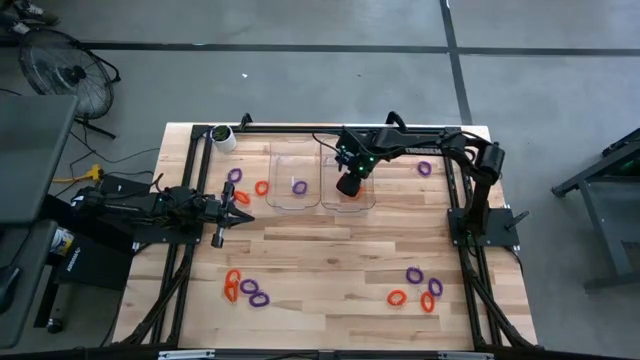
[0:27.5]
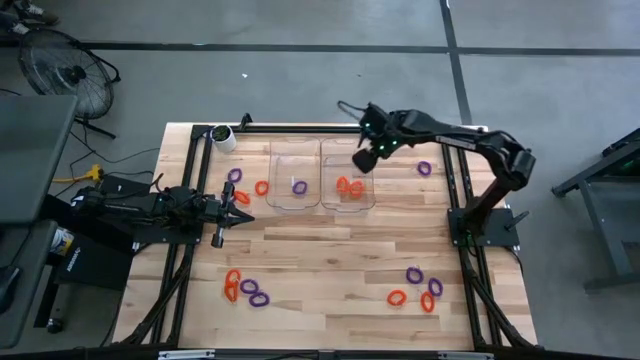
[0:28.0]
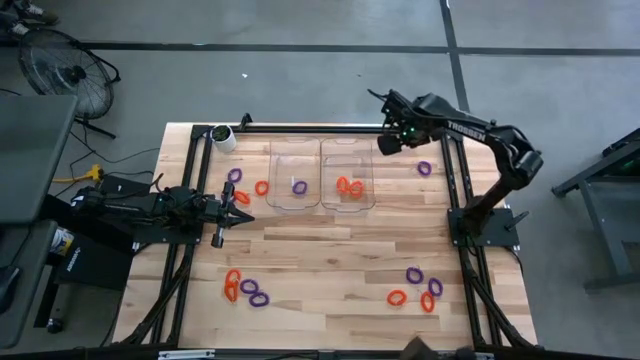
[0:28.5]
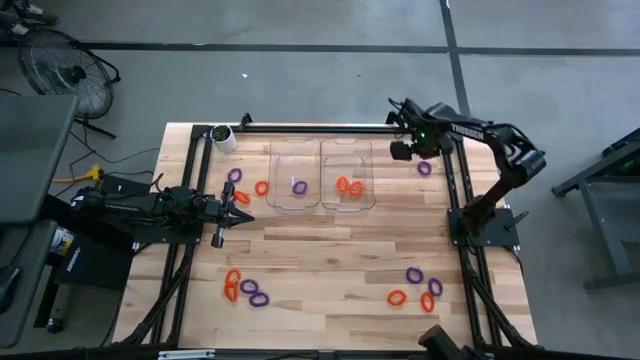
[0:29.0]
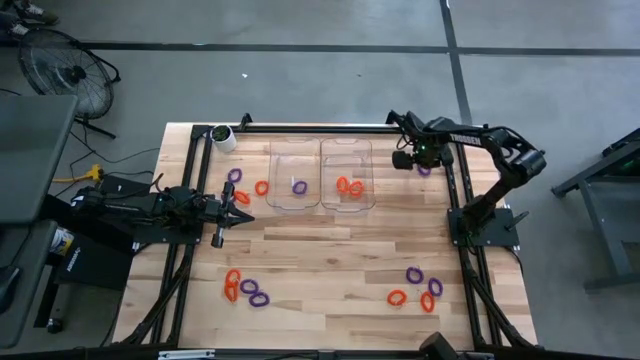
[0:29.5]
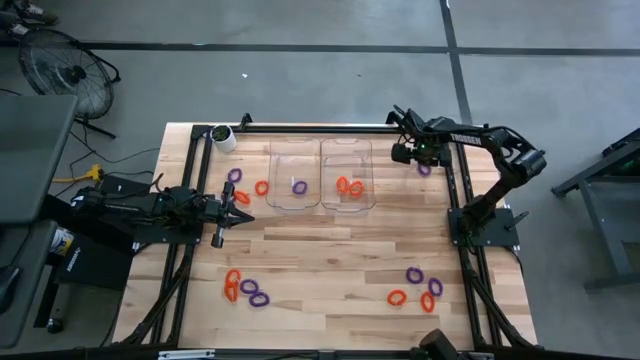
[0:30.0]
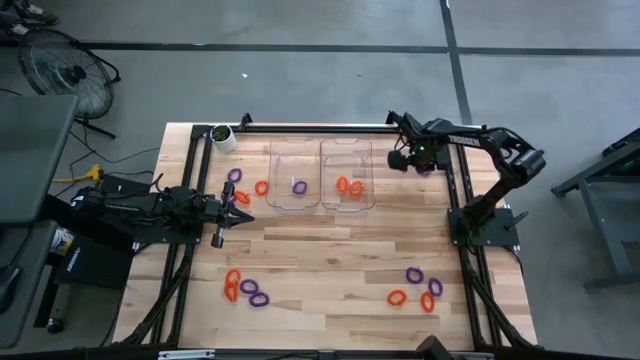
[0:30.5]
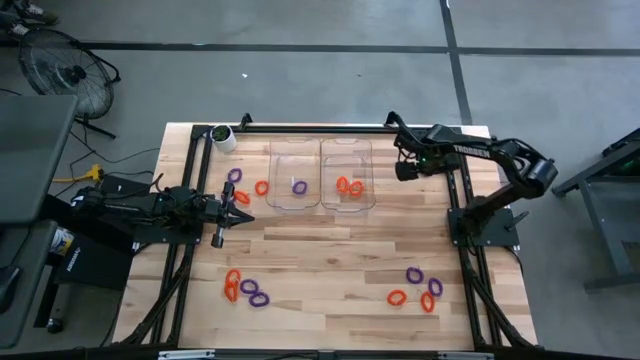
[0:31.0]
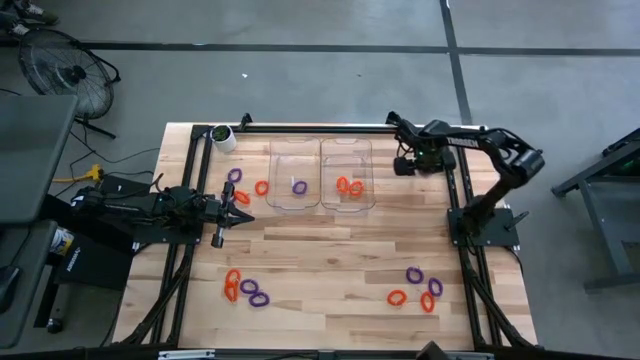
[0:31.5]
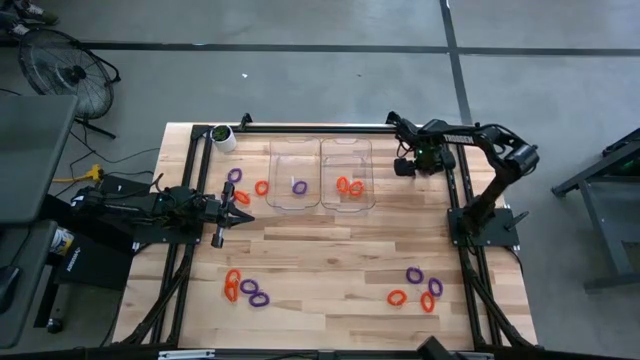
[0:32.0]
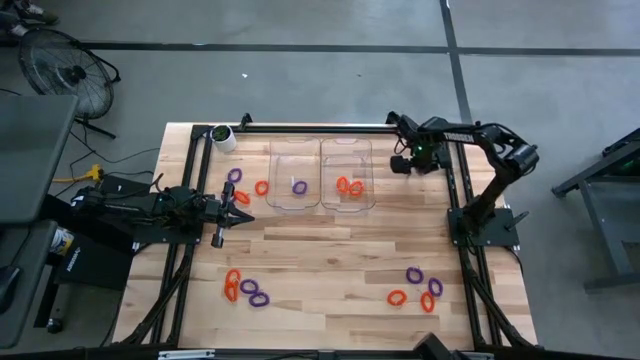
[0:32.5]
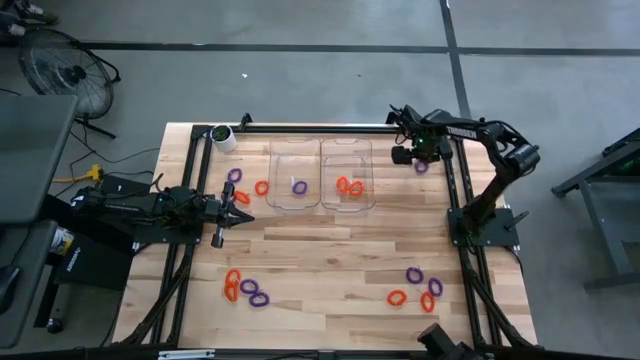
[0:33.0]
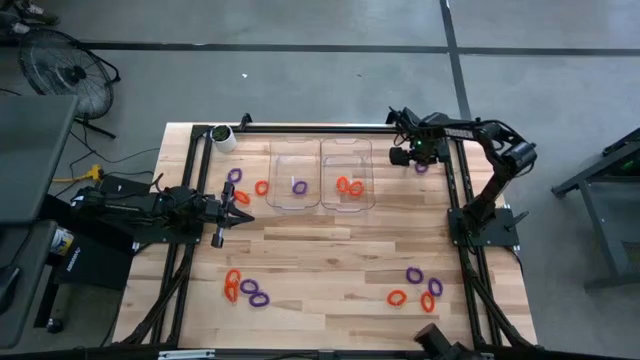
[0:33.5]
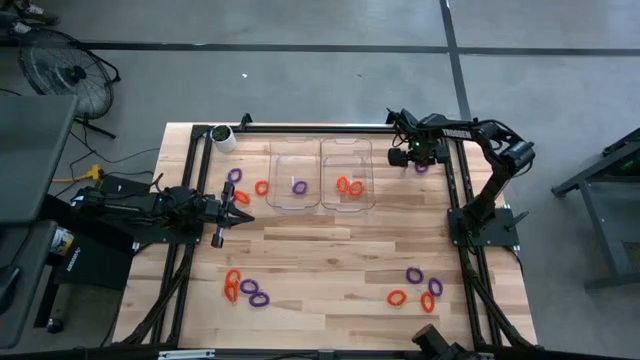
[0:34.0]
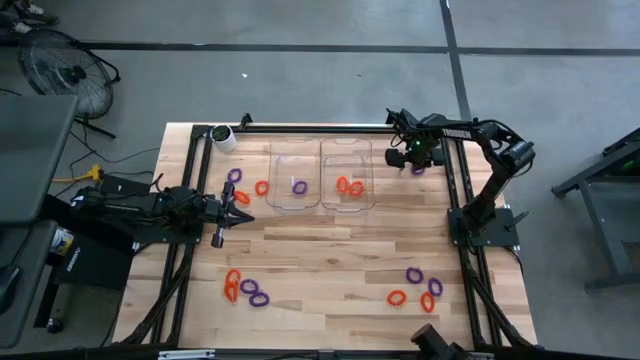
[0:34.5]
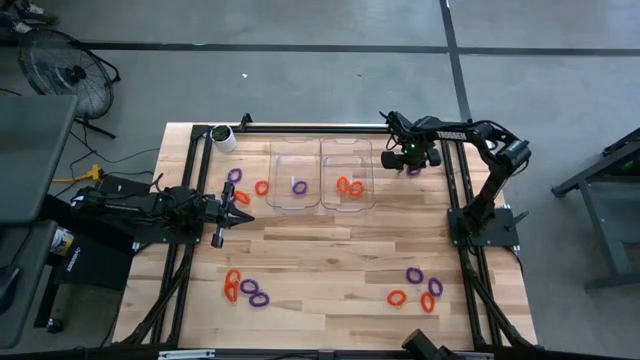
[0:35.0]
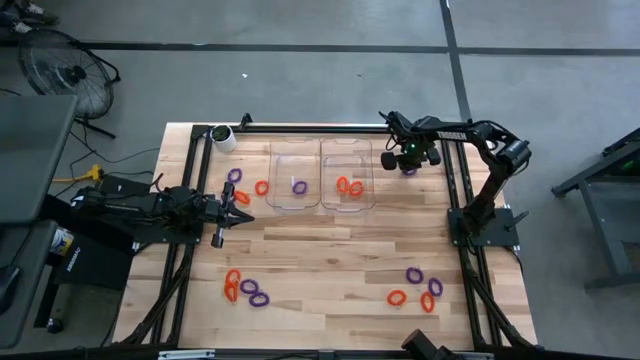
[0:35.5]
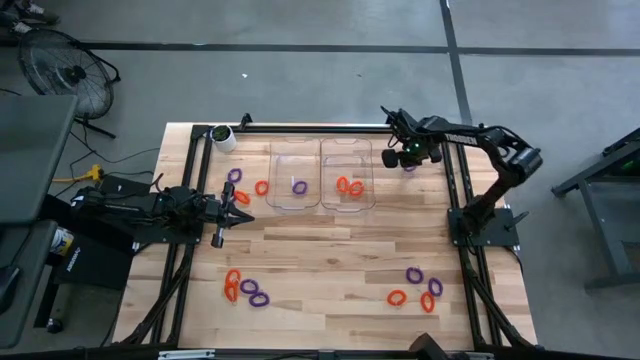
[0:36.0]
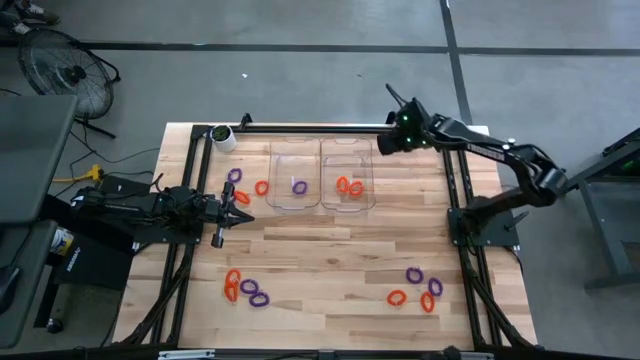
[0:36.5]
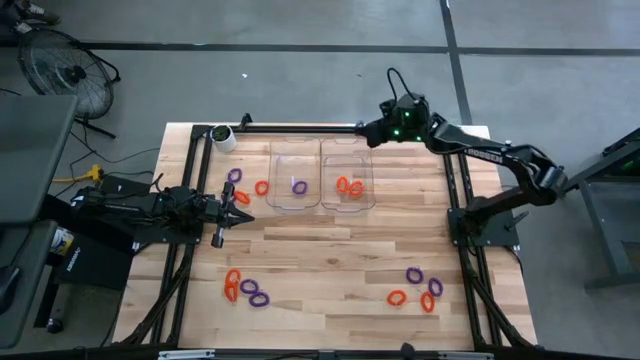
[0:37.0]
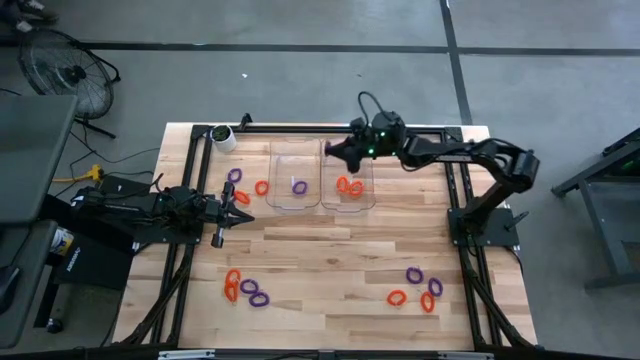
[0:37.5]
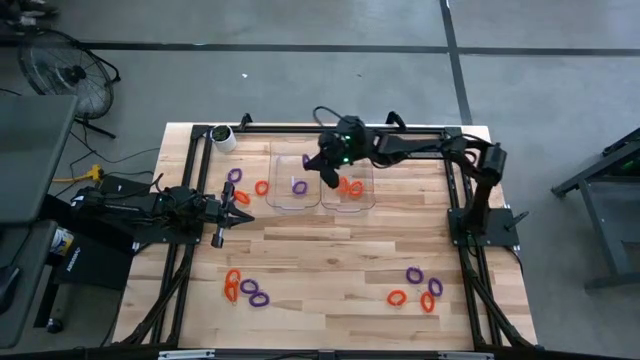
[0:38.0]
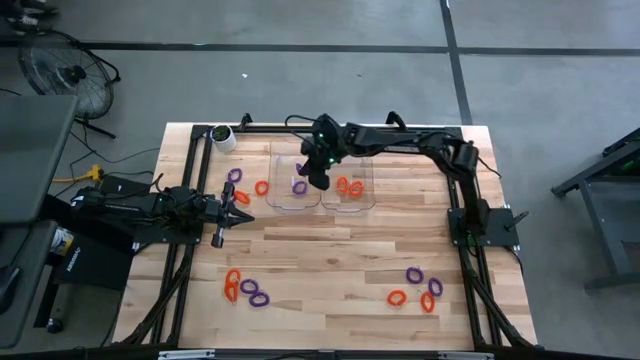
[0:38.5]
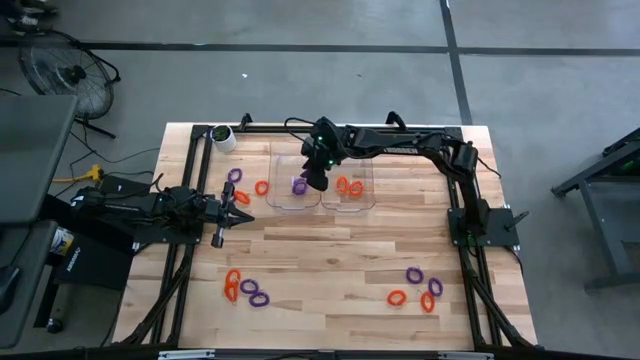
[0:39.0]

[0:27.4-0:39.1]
Task: Sort spring keychains
Put the purple spring keychain into the left transparent bin

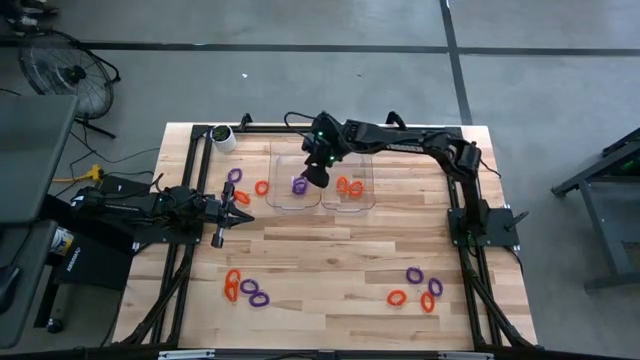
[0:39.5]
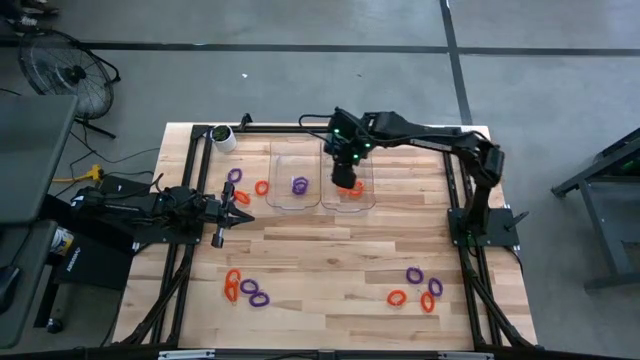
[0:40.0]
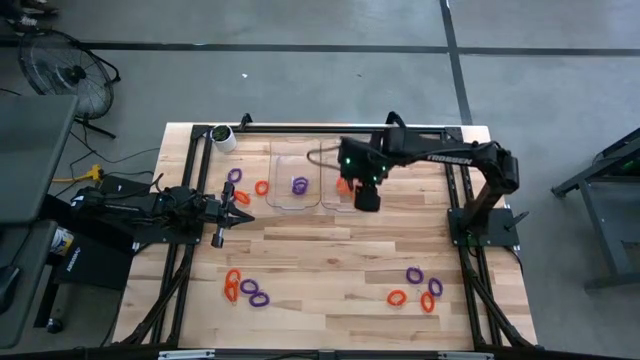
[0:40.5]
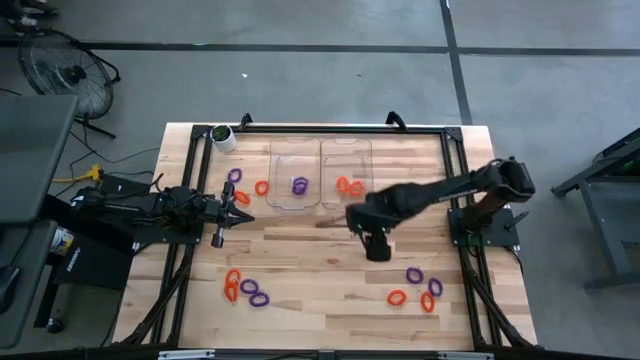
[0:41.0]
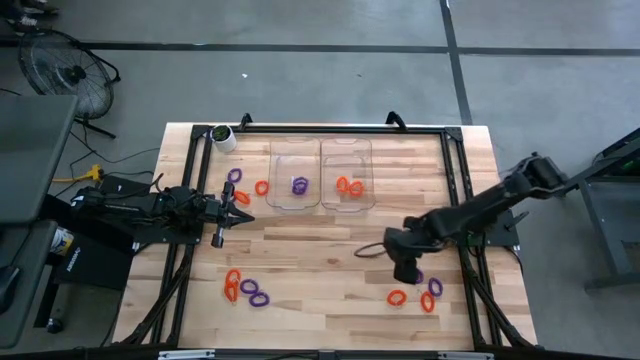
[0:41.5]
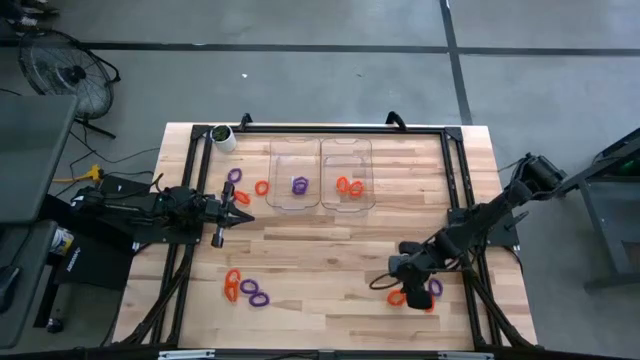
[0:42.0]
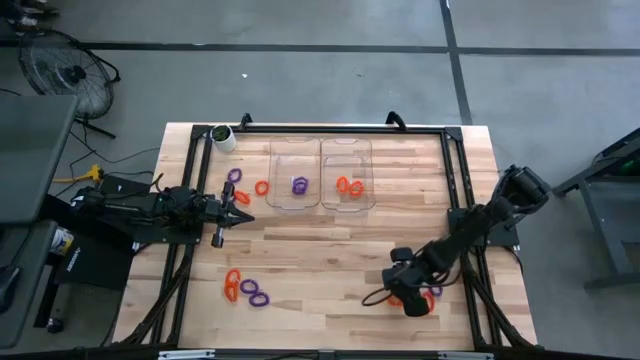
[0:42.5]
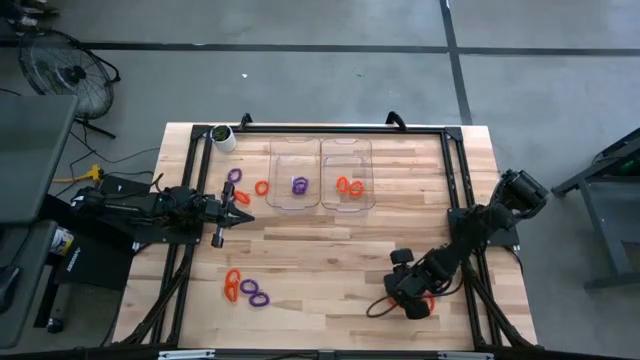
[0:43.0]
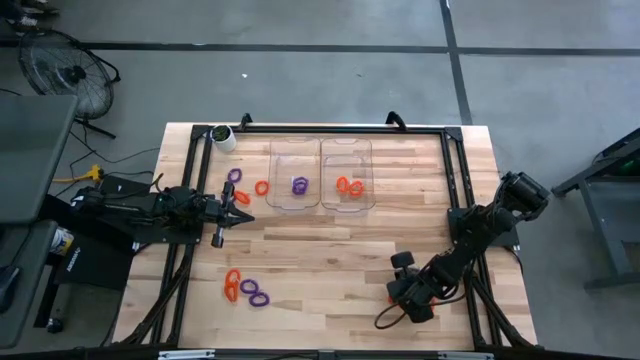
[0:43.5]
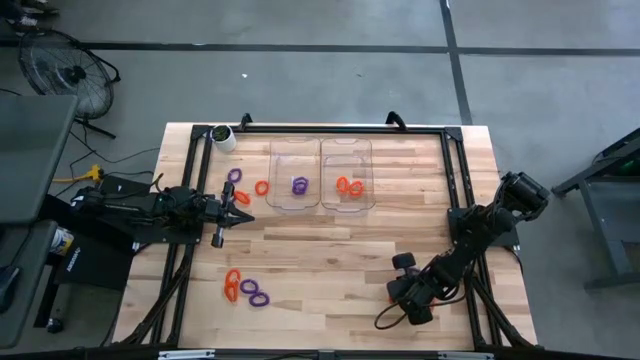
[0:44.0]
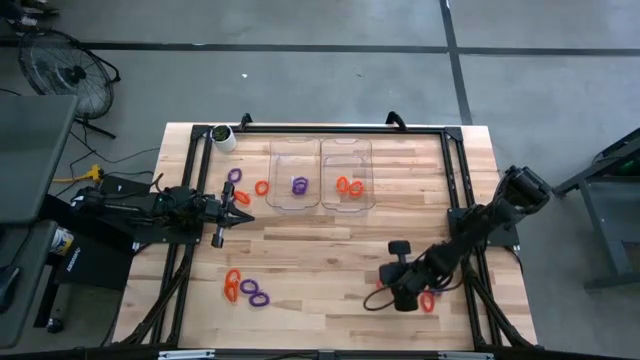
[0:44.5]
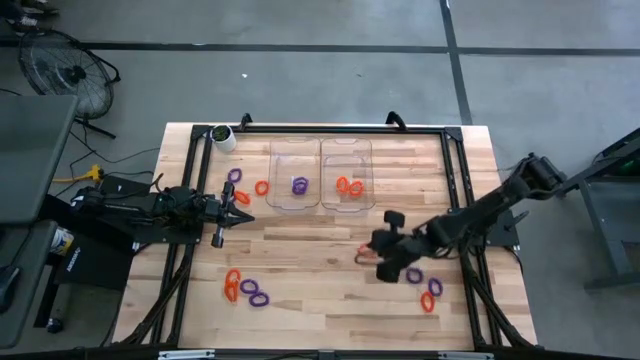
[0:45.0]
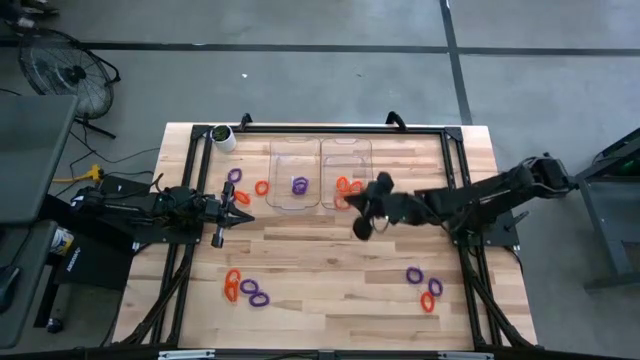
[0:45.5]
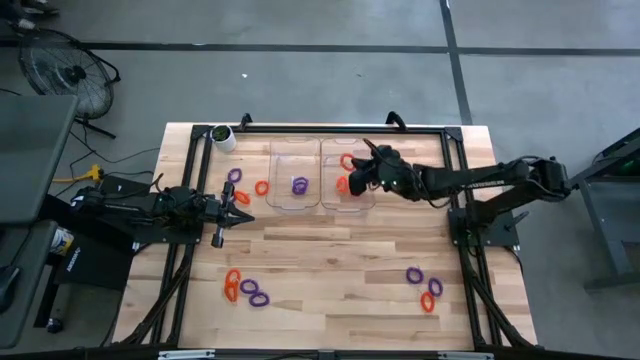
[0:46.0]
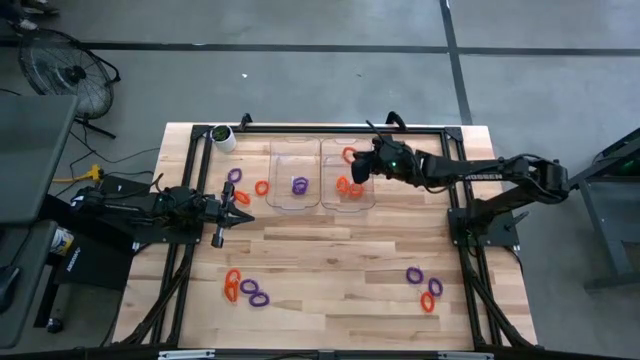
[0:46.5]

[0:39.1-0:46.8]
Put the orange spring keychain into the right transparent bin

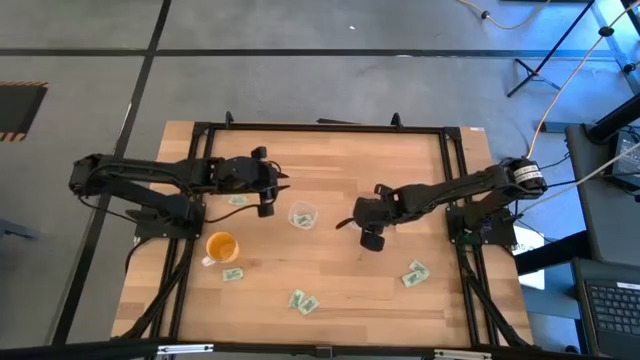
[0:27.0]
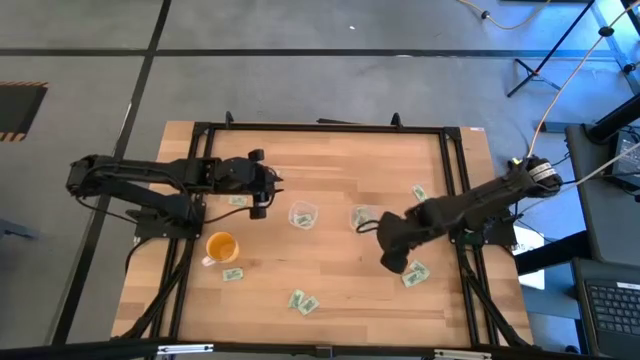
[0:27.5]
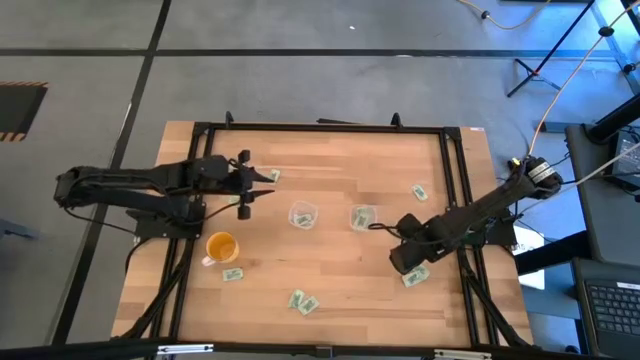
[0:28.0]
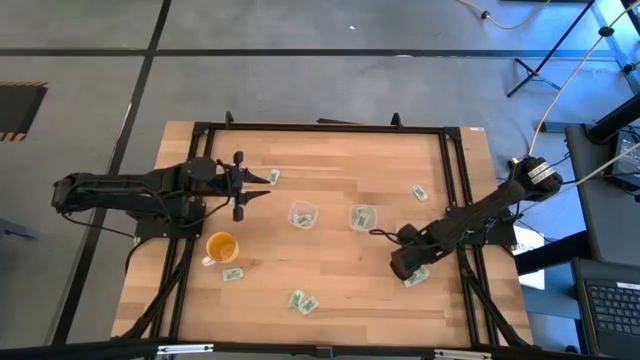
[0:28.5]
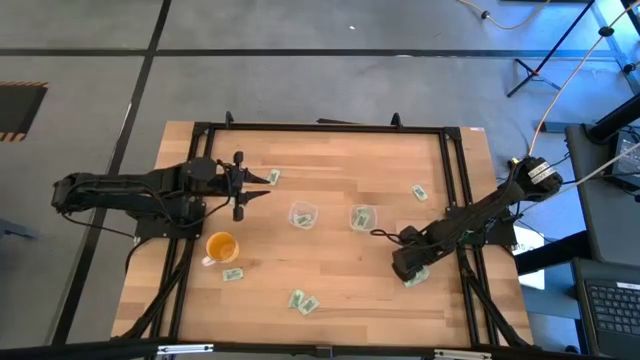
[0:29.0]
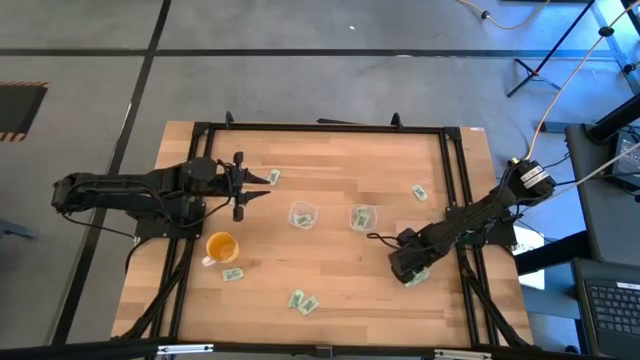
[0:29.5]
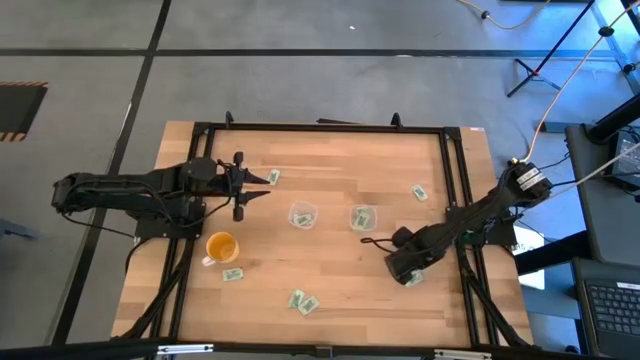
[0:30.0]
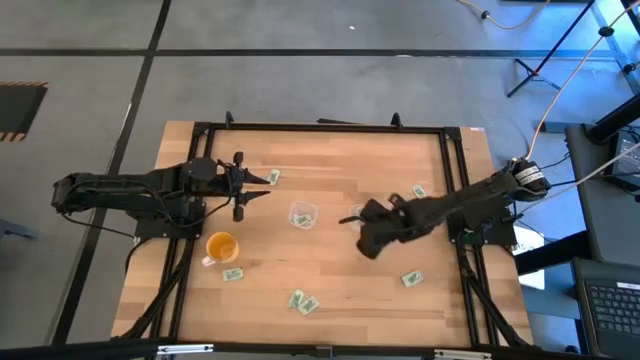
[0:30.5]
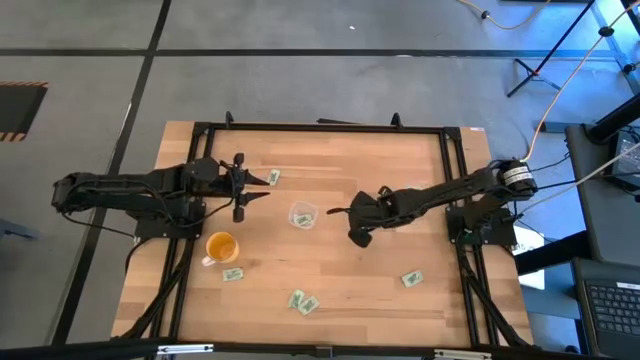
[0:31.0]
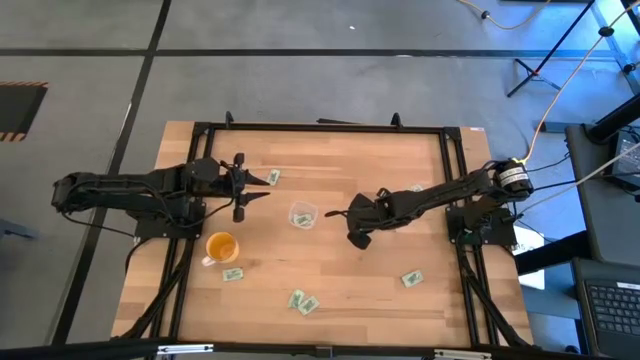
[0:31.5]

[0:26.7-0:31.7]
Task: Pick and place Stevia / Truvia into bins
Put the stevia packet into the right transparent container
